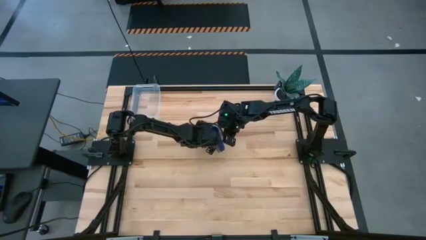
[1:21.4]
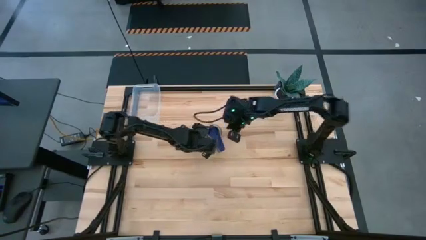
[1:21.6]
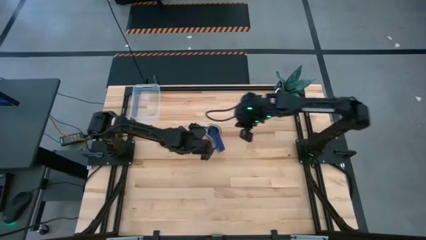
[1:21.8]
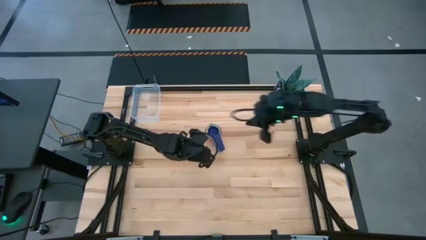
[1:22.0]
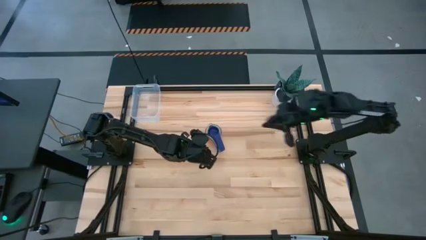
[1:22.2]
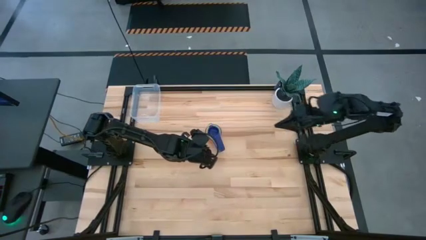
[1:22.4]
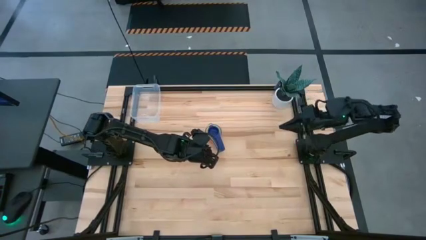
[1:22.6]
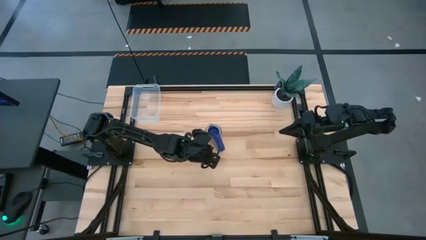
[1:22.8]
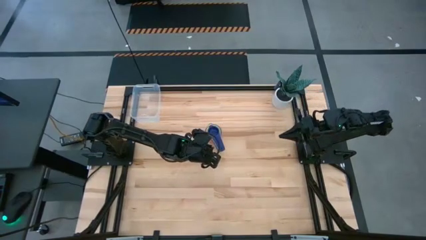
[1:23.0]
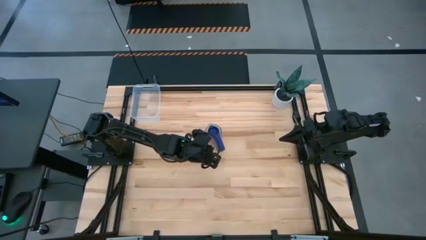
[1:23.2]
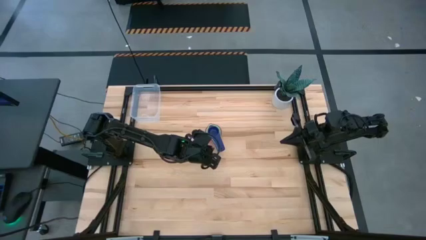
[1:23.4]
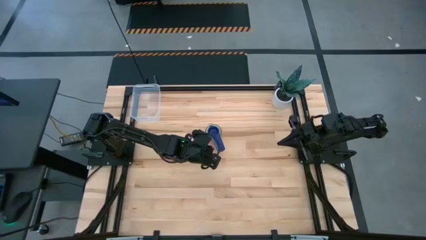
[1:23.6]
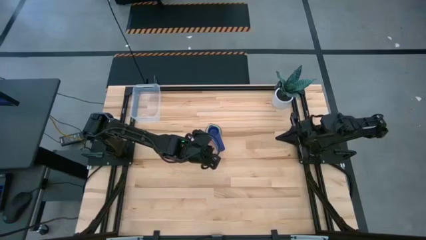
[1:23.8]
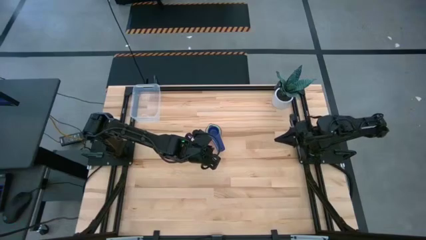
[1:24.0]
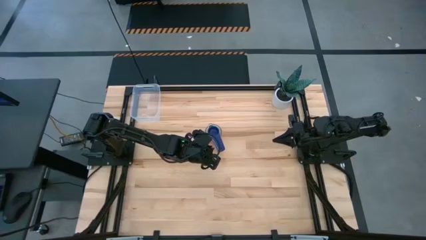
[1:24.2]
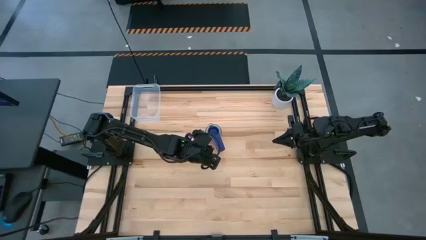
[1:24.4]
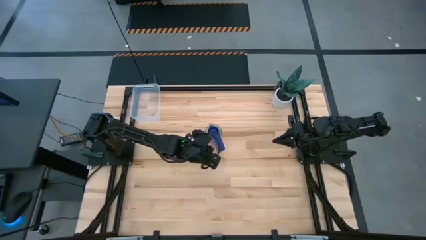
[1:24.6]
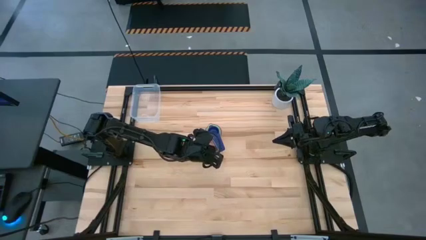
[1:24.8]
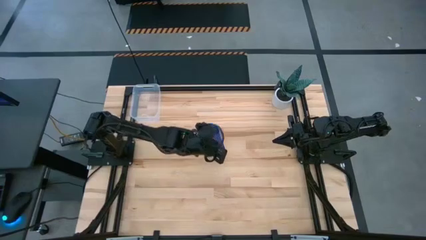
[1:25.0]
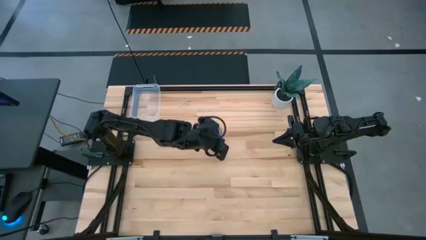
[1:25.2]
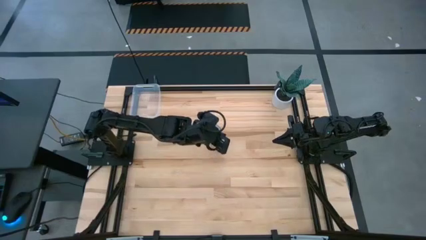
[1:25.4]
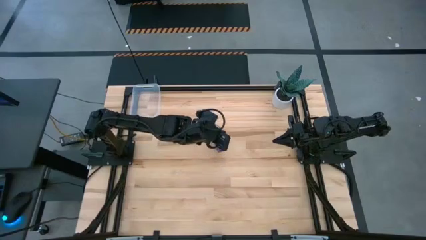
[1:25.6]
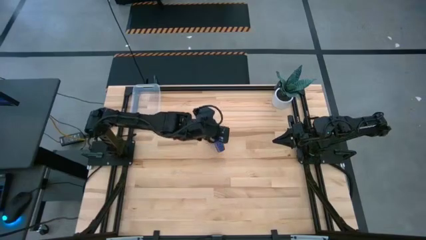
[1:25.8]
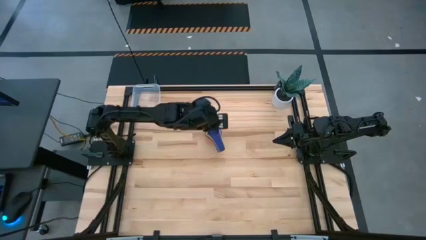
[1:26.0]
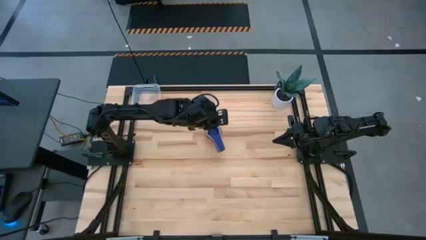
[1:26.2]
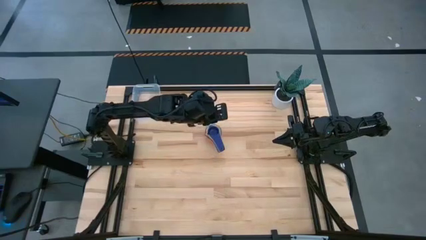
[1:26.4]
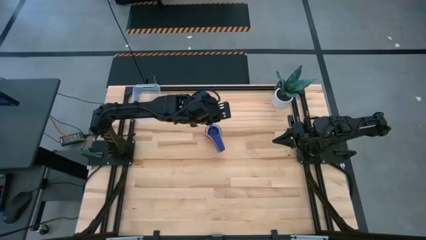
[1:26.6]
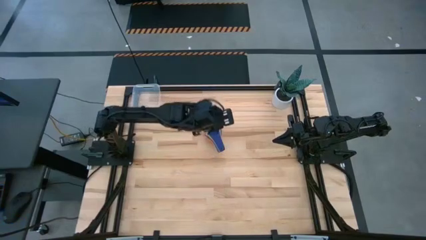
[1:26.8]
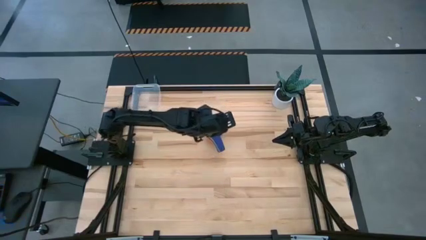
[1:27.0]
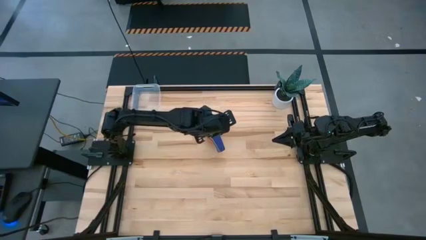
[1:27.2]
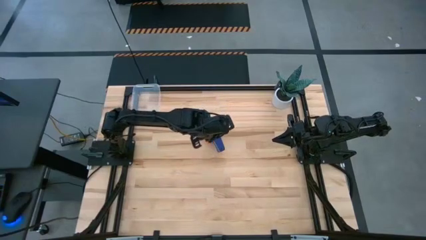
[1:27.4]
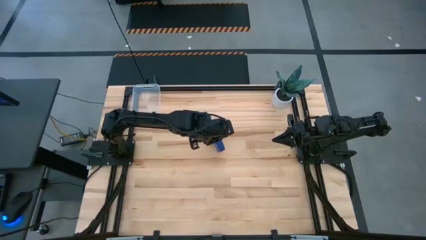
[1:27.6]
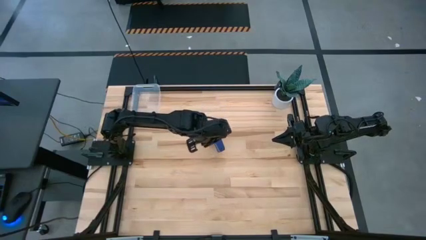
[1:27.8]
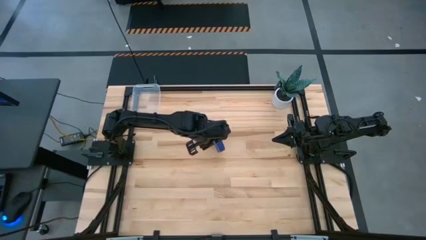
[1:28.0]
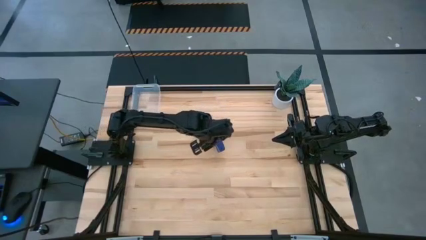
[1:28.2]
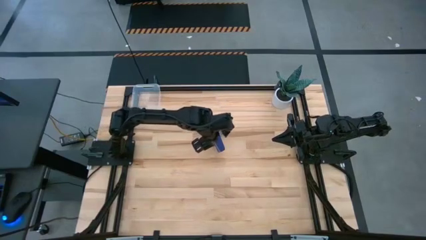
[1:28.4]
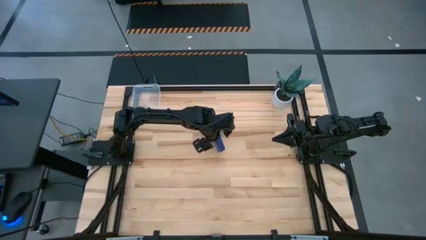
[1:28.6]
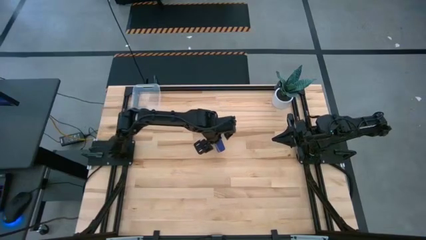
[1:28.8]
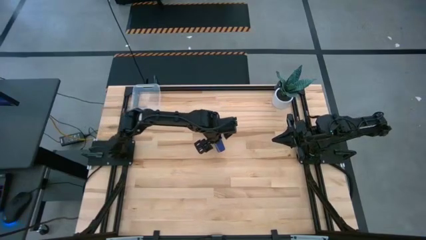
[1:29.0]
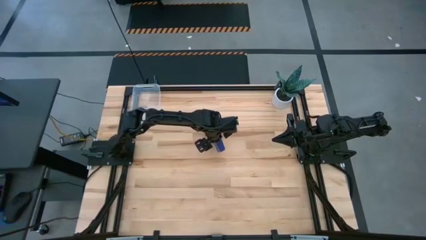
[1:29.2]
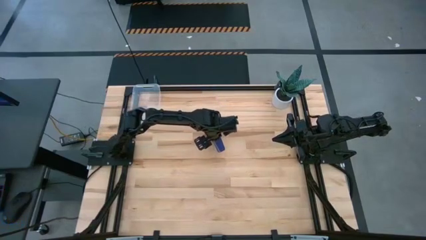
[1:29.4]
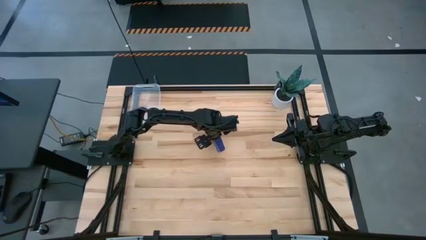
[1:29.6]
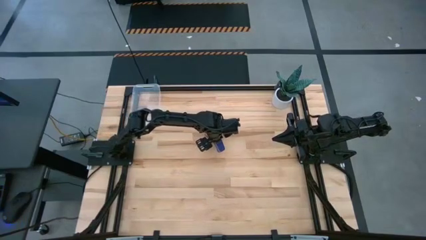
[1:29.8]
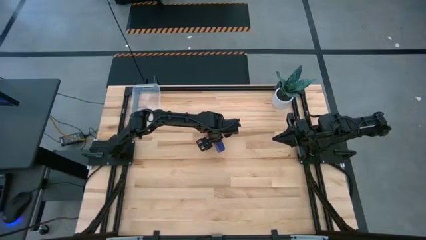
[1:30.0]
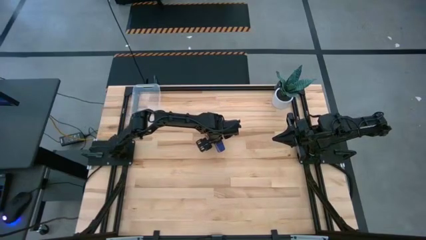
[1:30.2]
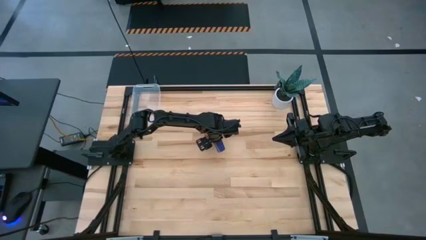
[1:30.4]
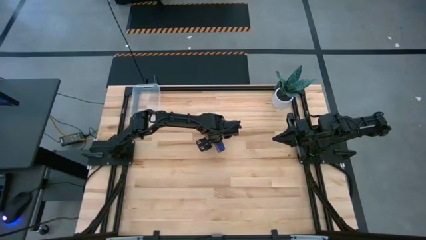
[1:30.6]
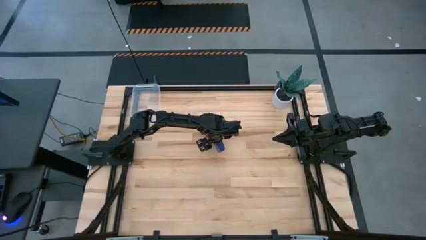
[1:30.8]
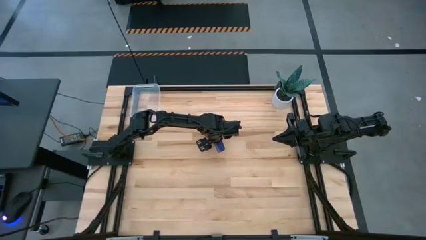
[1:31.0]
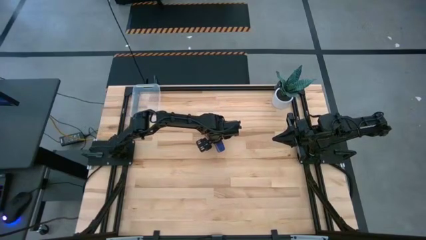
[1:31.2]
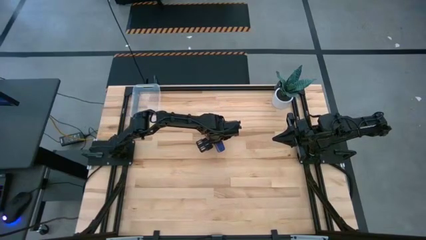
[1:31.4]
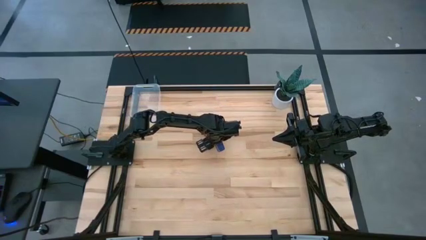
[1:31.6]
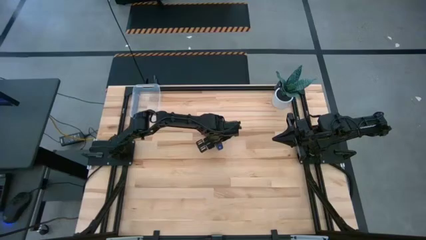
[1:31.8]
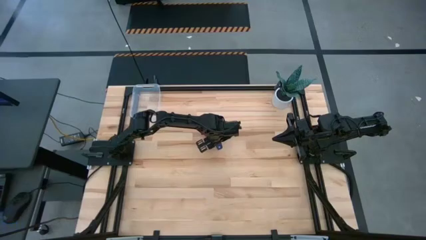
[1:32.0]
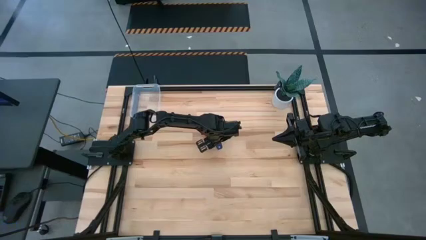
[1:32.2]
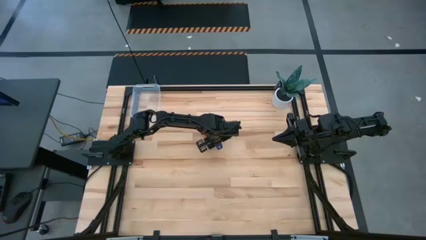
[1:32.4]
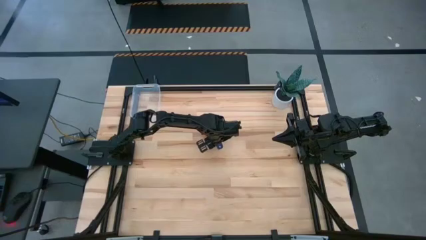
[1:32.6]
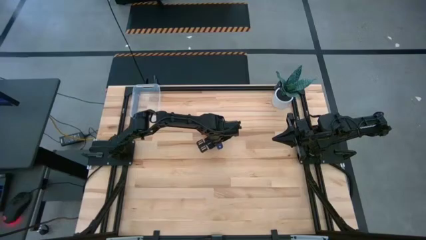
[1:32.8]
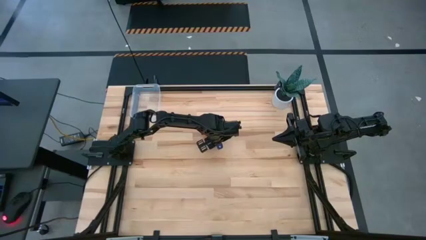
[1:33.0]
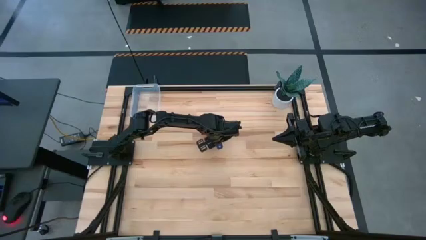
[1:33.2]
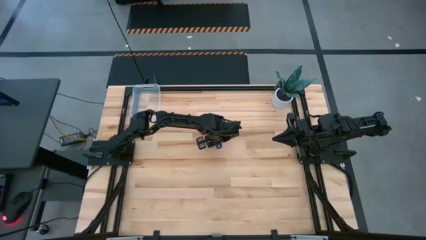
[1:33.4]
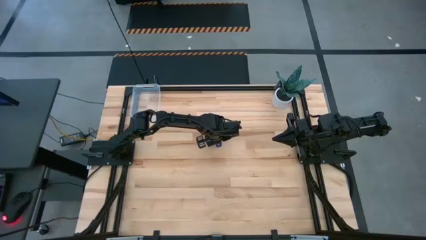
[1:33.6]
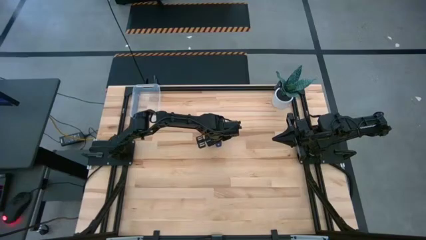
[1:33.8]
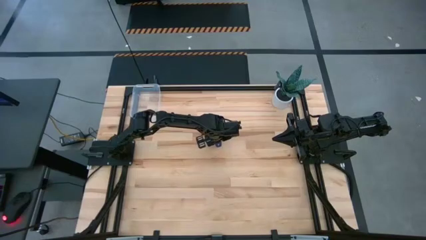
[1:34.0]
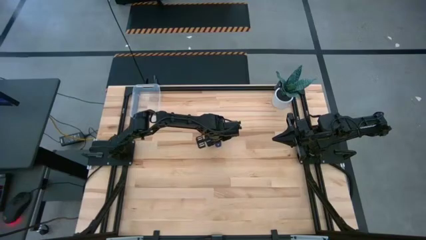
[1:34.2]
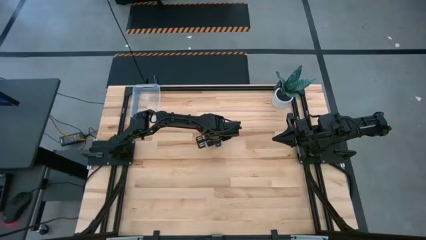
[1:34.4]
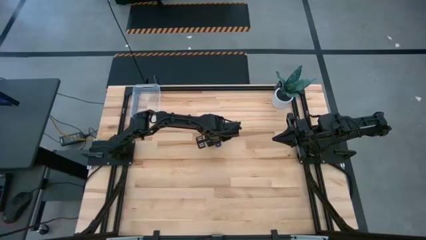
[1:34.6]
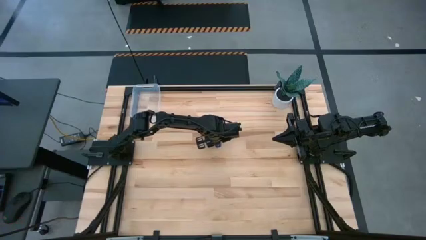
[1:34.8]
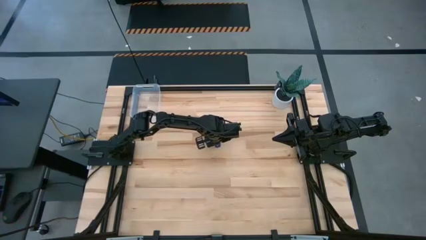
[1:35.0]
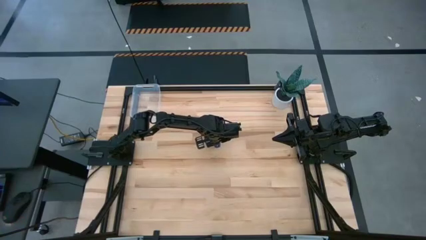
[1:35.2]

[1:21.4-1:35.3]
Task: Nest measuring cups in basket
Put the measuring cups into the transparent bin

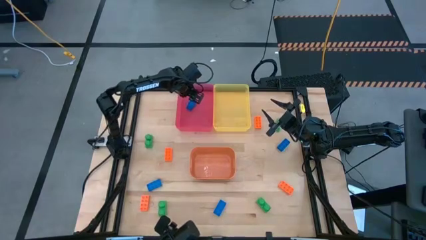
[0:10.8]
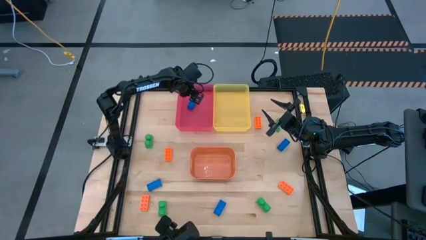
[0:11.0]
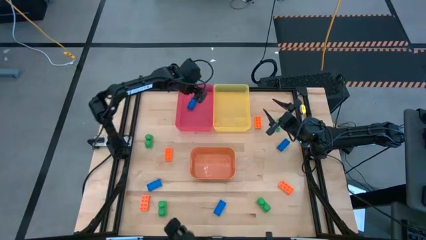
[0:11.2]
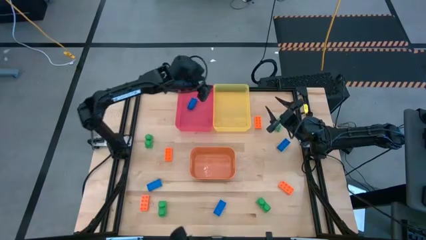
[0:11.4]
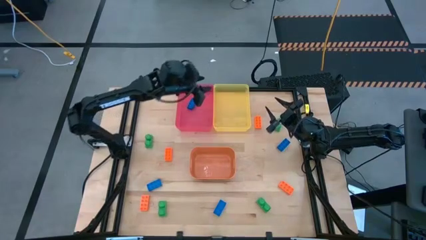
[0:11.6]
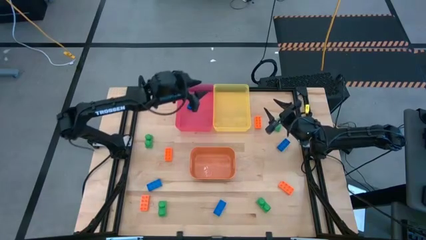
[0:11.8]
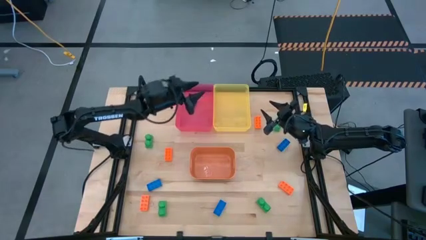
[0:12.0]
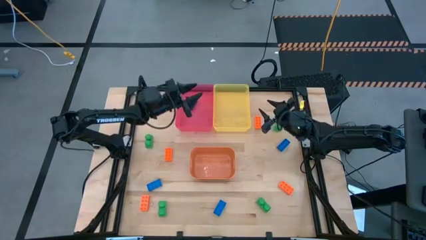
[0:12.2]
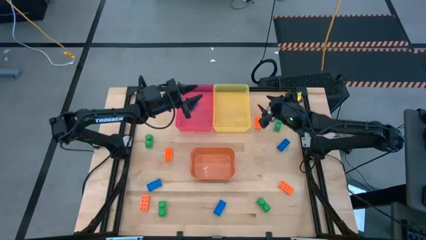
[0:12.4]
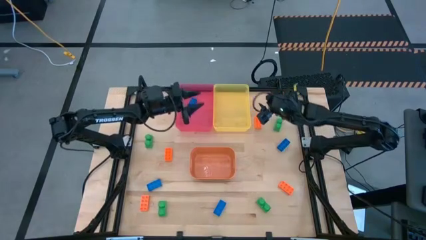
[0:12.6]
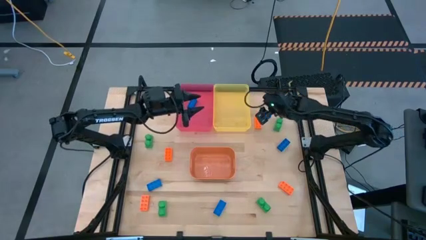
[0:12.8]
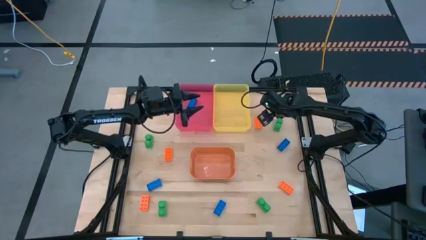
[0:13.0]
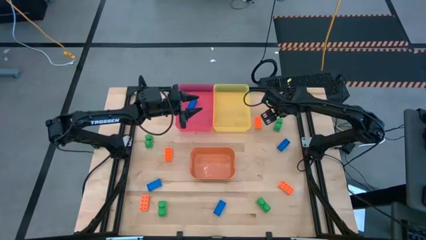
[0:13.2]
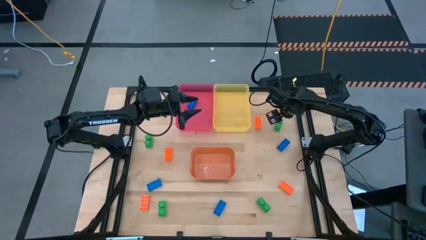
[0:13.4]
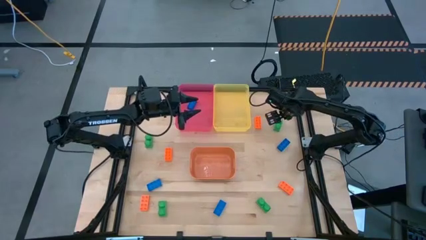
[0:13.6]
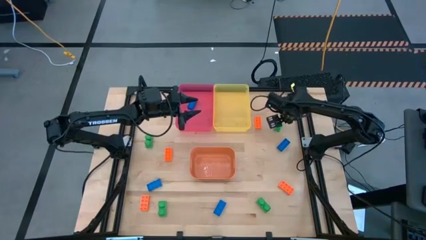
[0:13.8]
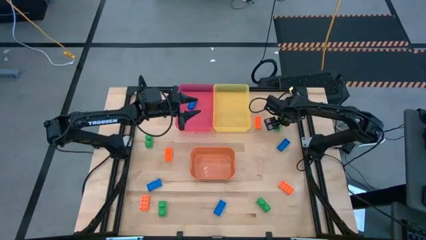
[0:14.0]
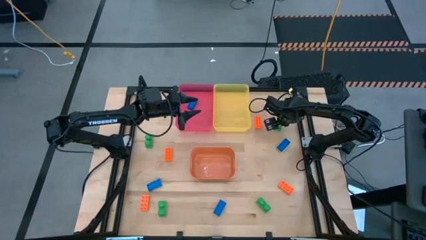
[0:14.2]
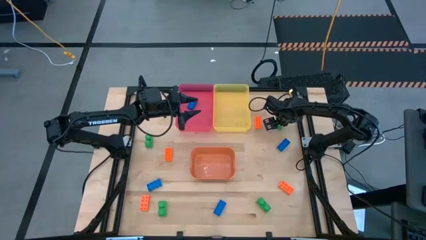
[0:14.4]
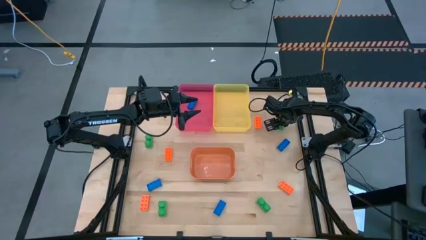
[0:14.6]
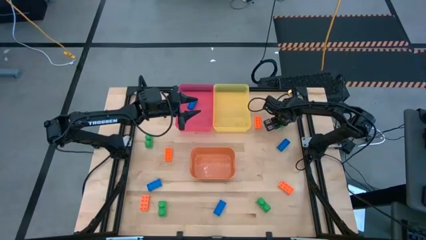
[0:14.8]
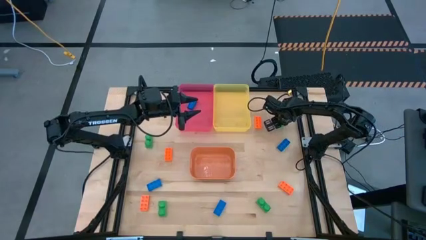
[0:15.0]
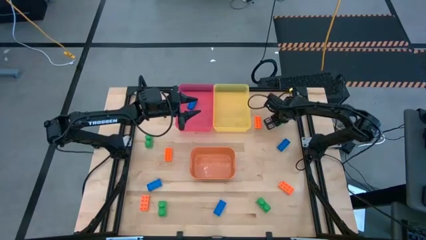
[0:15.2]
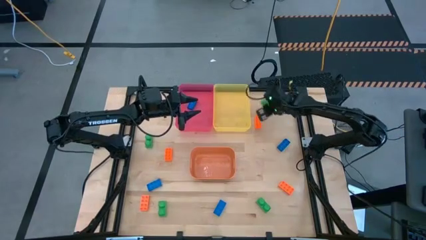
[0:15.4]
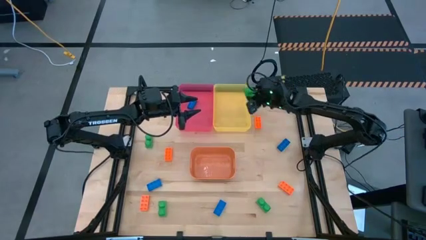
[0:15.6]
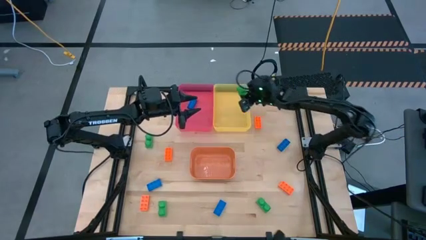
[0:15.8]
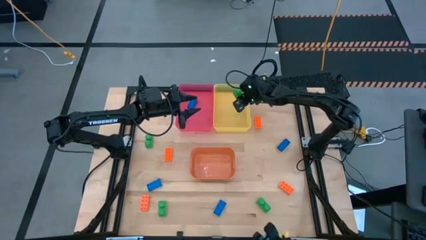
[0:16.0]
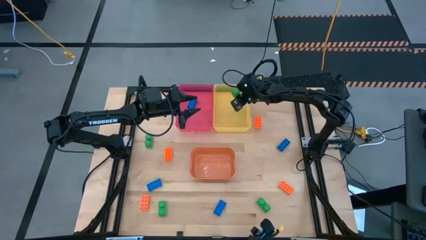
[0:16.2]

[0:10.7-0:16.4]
Task: Sort & place blocks by color
Put the green game piece into the yellow bin
